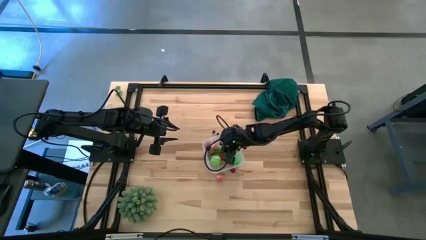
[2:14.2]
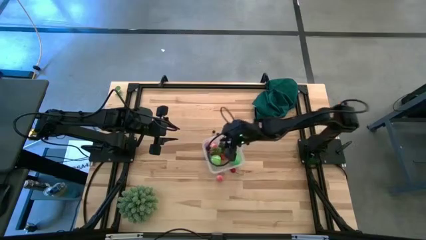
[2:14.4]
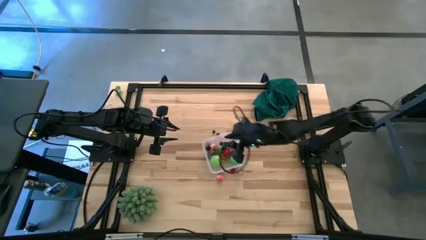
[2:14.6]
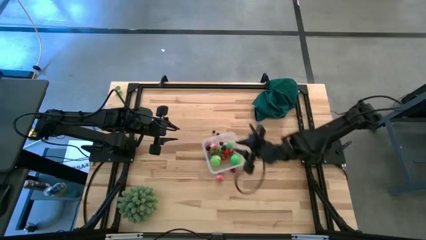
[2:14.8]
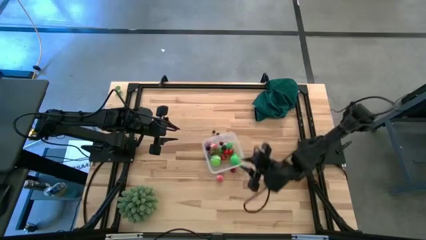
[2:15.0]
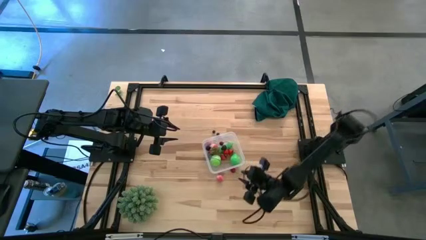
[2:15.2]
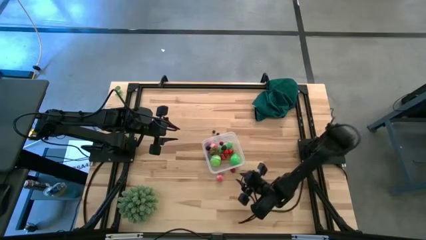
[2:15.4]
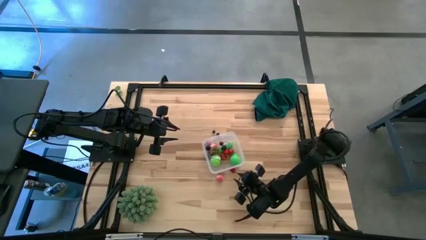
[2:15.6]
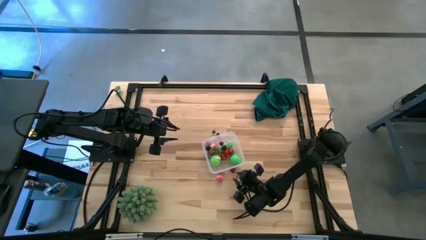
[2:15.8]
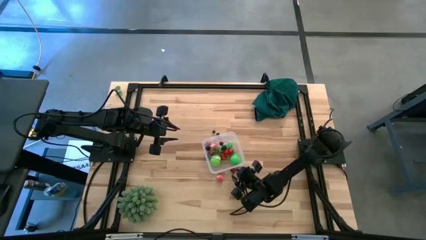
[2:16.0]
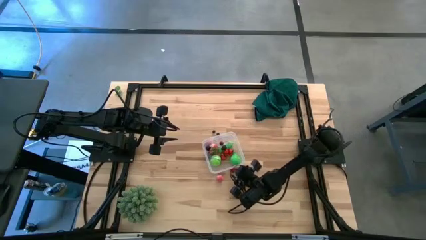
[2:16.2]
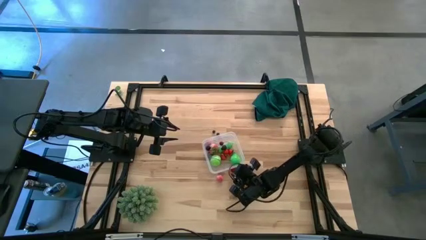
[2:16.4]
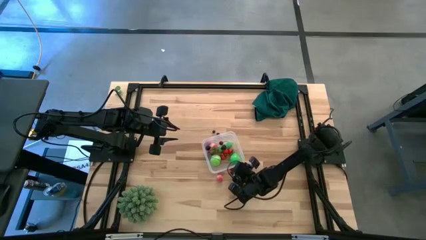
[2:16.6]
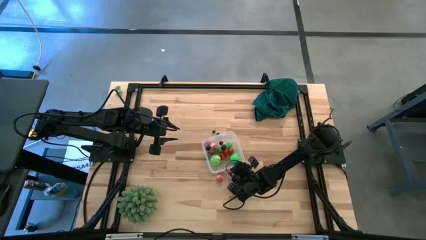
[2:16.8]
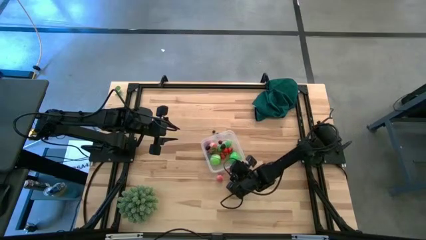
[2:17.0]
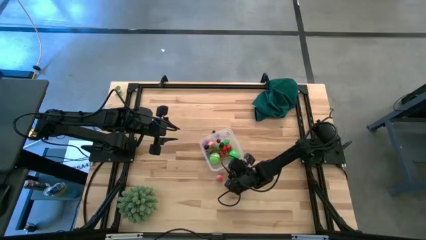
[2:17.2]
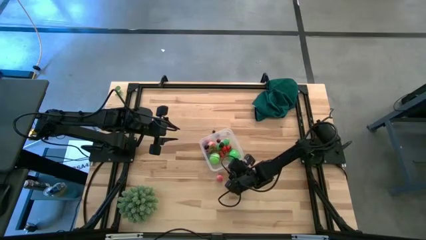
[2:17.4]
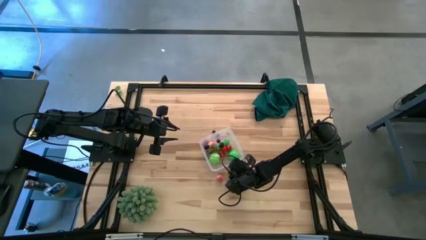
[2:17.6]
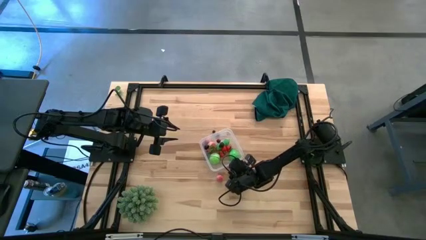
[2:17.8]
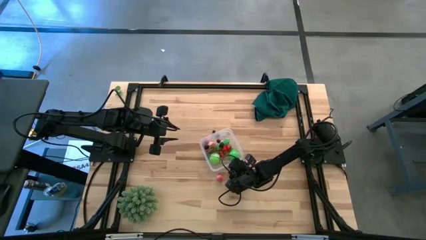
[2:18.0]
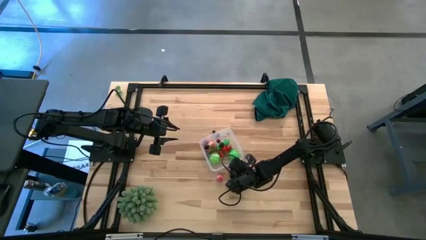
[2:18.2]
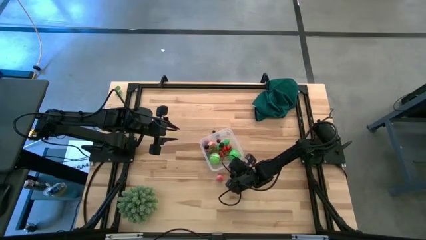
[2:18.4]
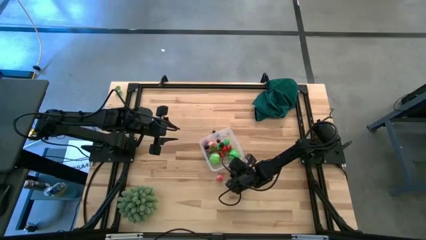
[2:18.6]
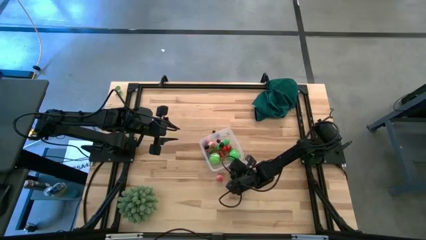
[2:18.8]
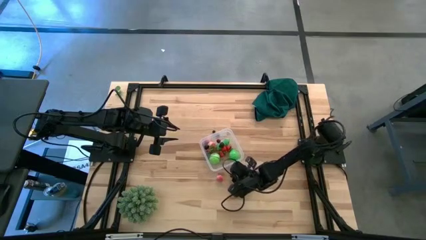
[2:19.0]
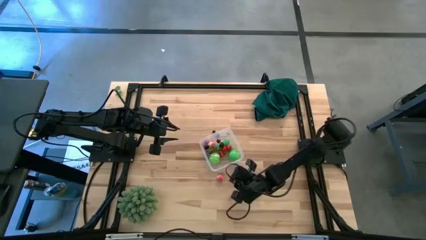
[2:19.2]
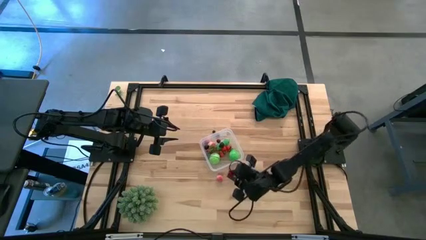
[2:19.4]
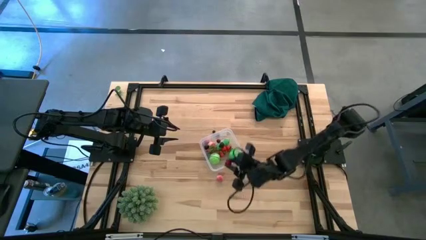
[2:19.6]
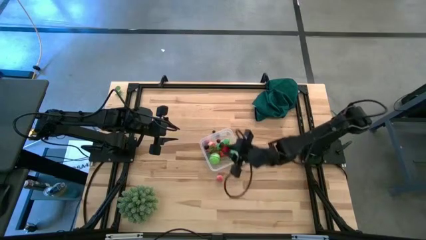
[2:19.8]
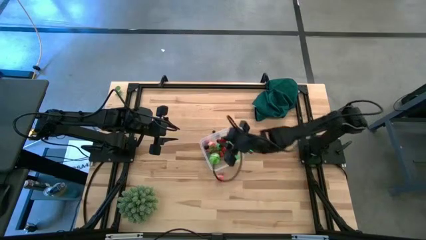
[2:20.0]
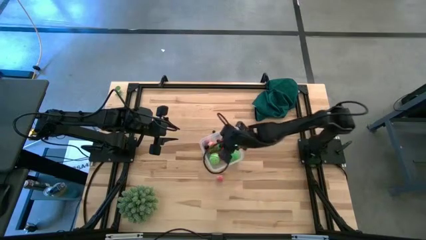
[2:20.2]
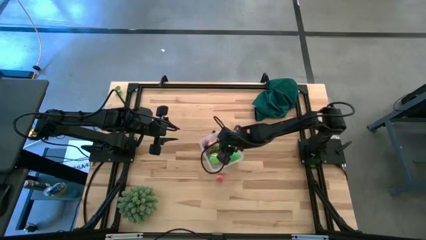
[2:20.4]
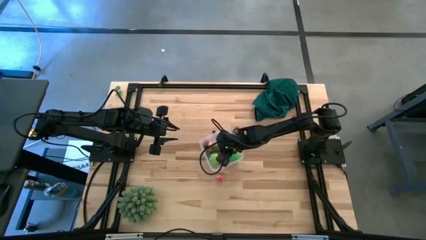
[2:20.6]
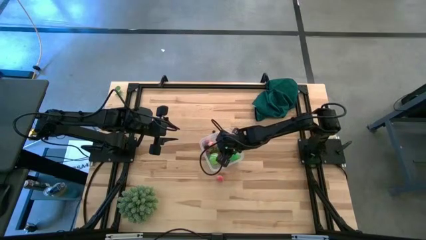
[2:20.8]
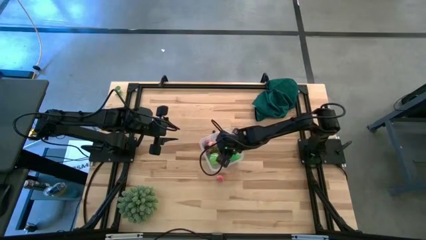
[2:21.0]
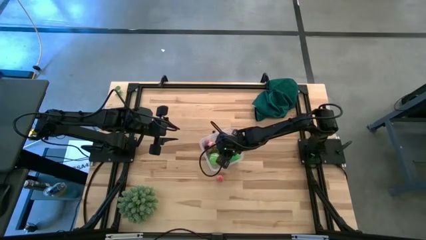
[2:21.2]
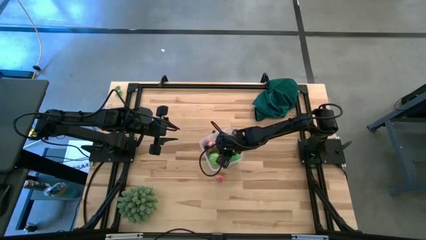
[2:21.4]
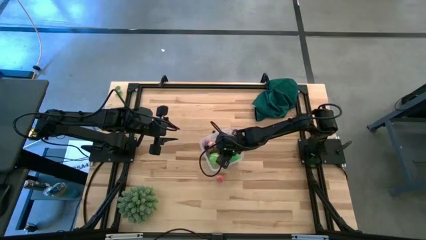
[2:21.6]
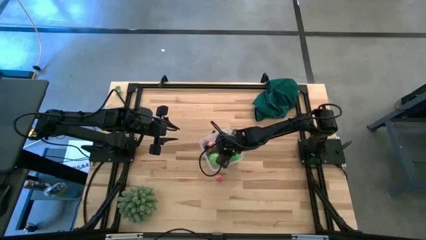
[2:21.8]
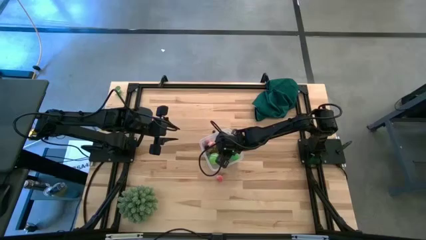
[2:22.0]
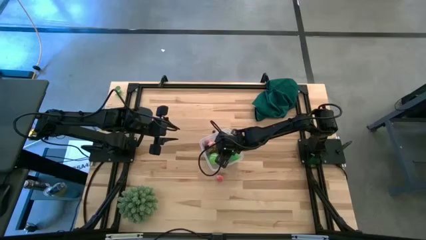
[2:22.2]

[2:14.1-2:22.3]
Task: Pick and placing Produce into tupperware
Put the red cherry into the transparent container

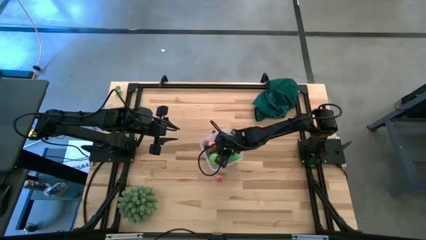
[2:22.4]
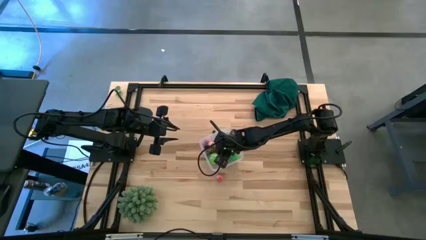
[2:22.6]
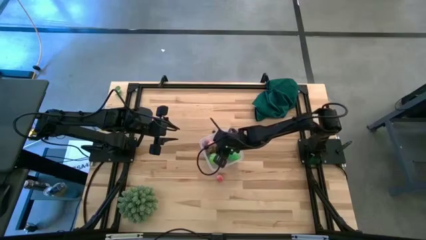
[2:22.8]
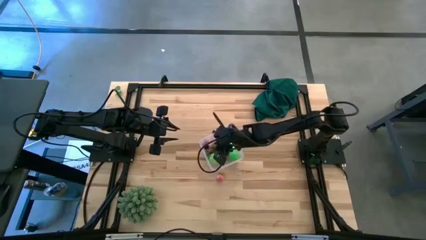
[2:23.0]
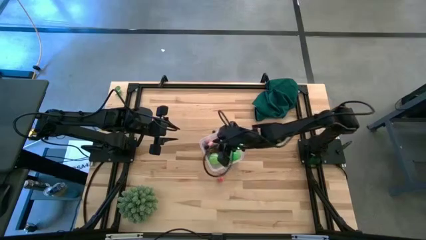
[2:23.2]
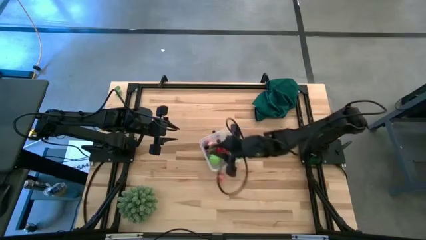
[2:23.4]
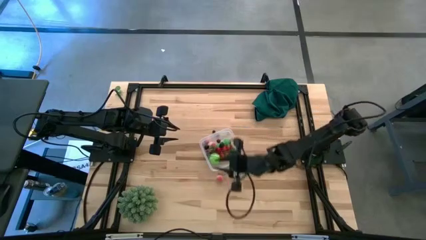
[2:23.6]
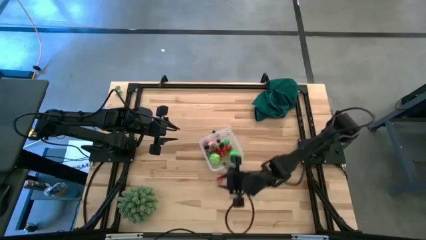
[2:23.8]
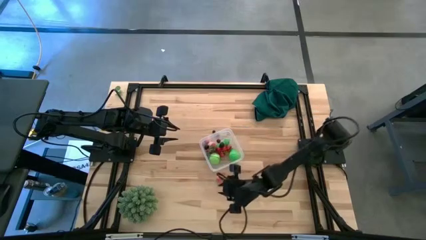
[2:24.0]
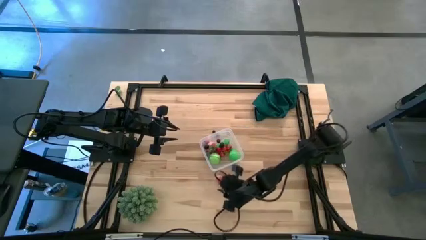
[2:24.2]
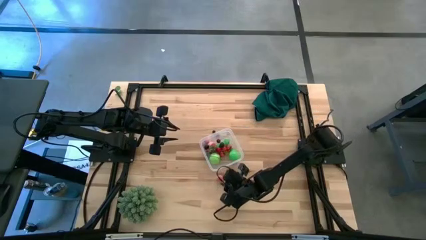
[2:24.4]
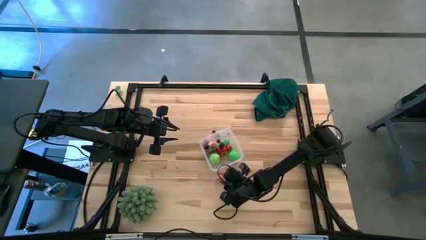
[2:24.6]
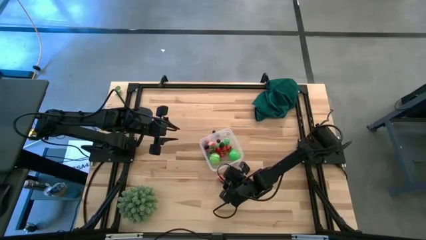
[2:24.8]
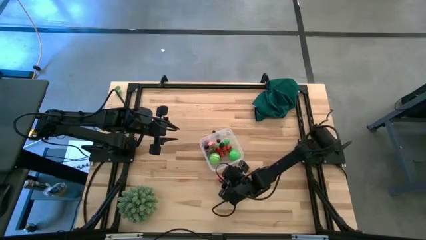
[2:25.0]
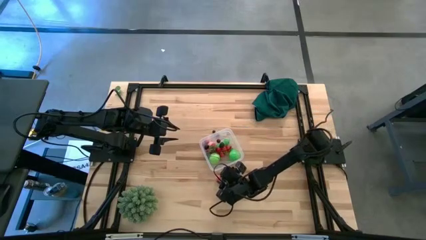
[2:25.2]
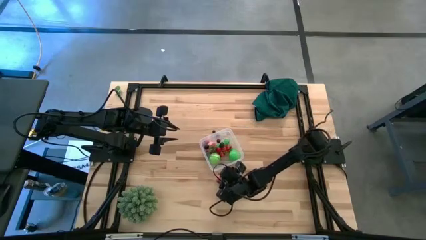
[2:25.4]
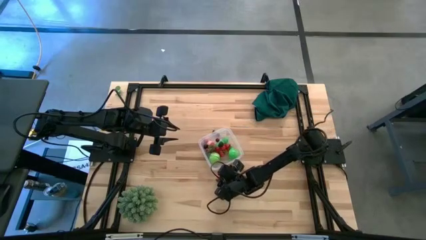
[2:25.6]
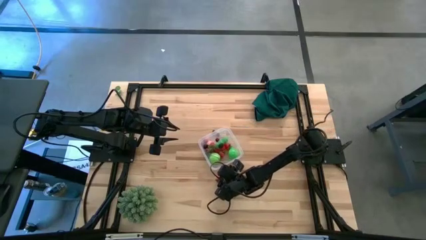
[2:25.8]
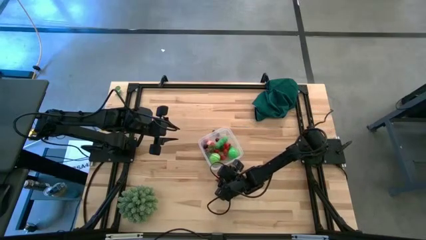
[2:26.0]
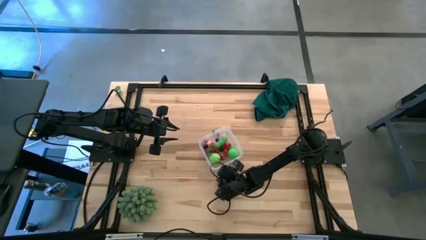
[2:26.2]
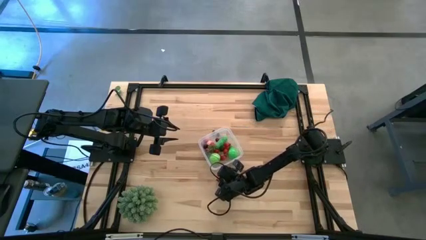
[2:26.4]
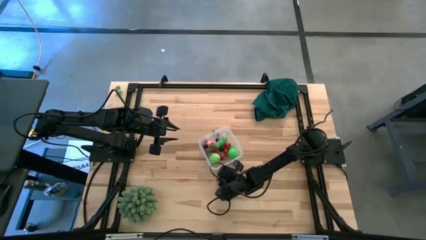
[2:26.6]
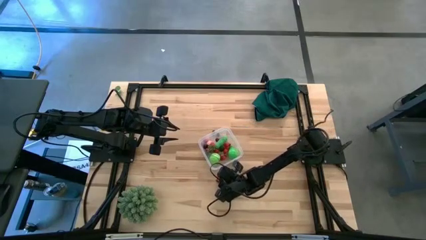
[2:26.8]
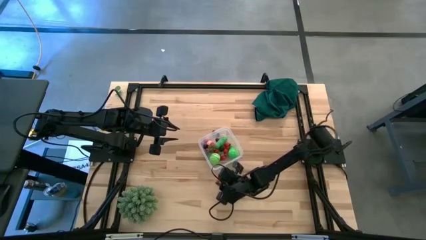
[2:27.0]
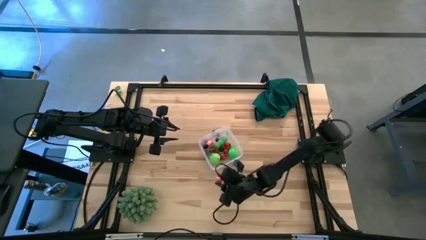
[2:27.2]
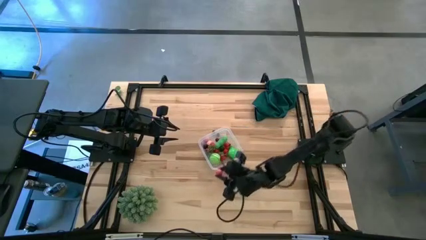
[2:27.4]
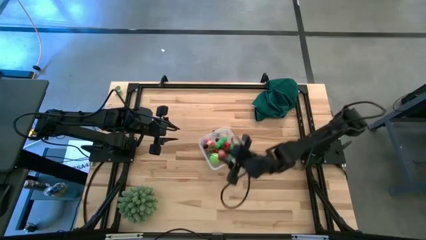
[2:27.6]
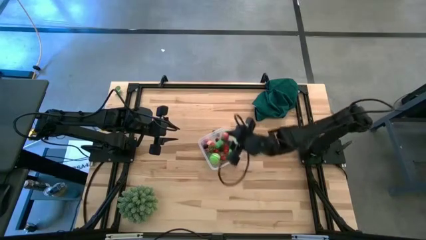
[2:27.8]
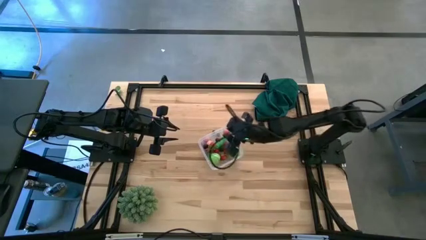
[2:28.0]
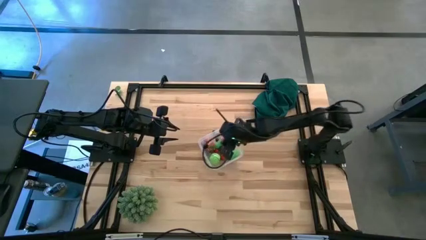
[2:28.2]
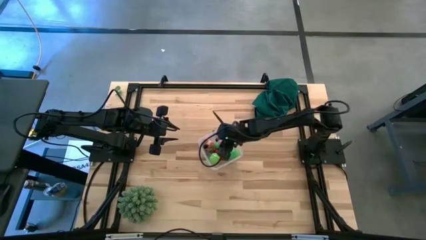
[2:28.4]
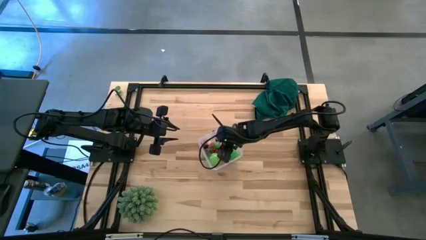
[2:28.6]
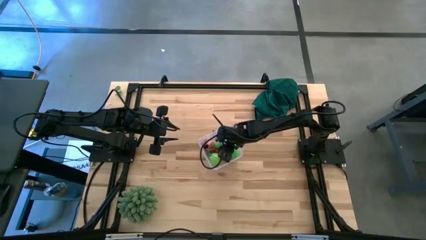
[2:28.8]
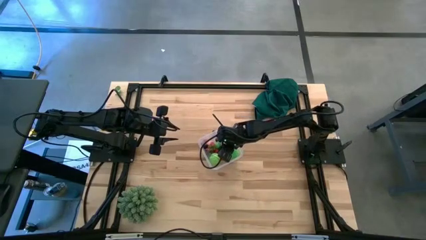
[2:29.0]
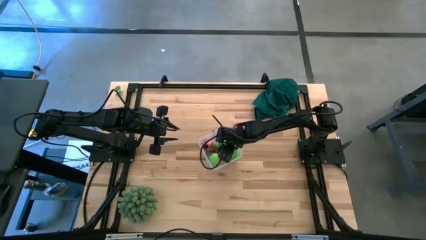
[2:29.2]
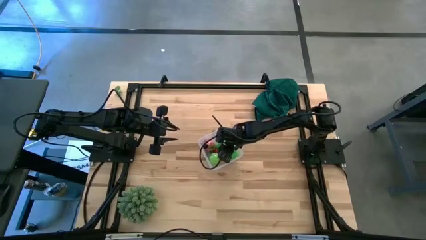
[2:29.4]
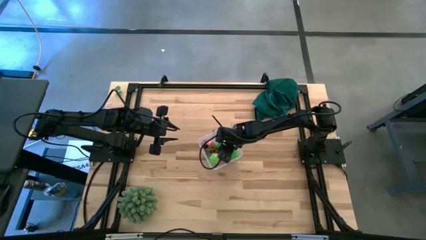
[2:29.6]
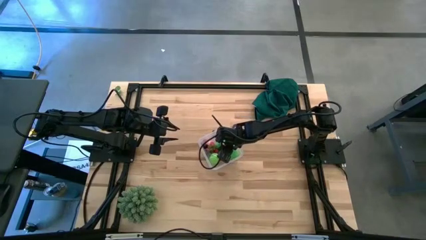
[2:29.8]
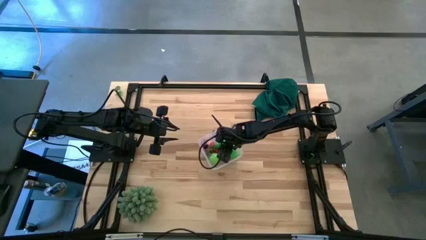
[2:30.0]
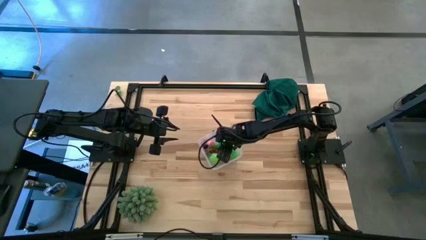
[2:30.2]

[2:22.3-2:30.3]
Put the pink peach into the transparent container

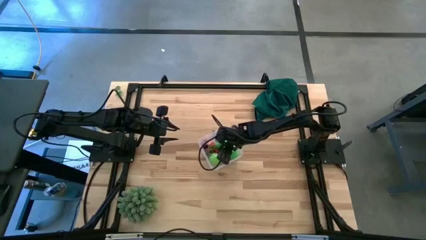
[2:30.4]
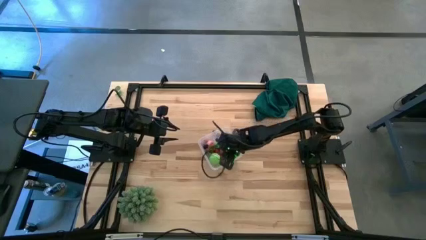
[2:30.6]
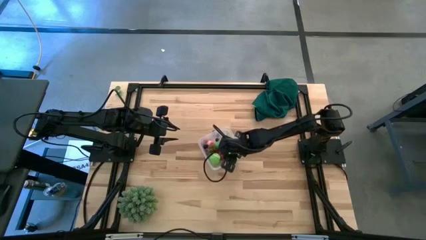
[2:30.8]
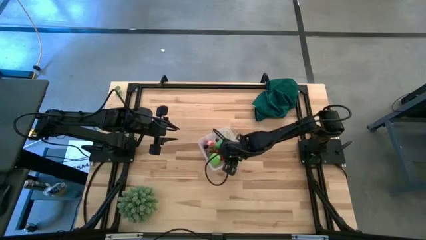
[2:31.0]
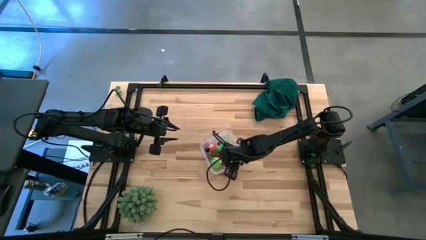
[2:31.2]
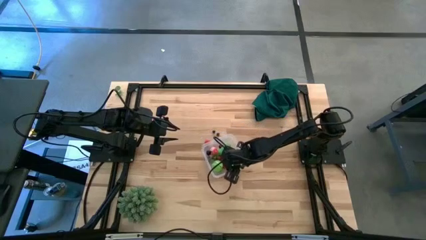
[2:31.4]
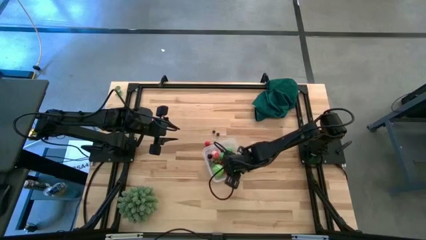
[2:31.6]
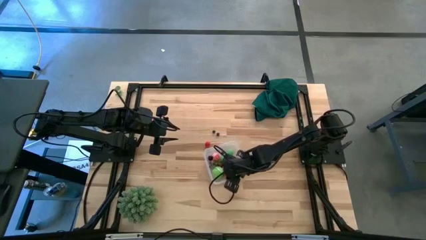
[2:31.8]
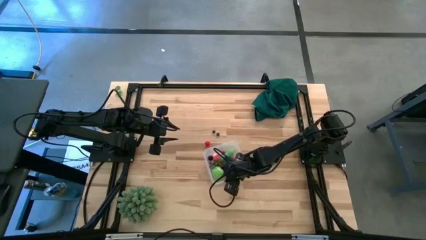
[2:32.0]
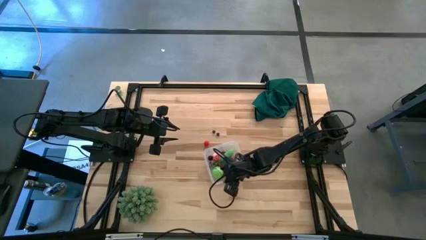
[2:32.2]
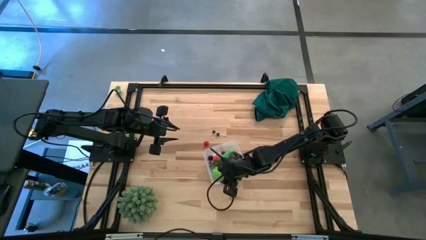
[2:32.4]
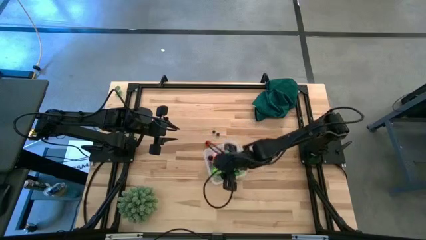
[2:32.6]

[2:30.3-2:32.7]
Adjust the transparent container
